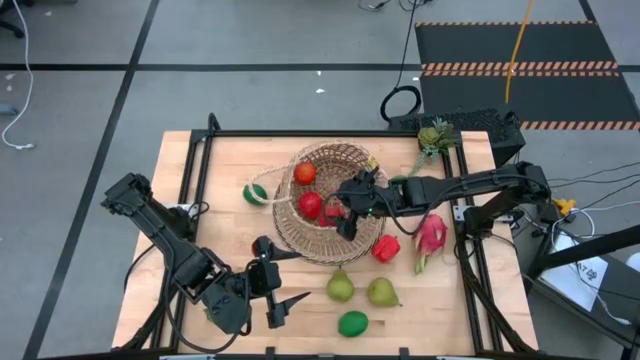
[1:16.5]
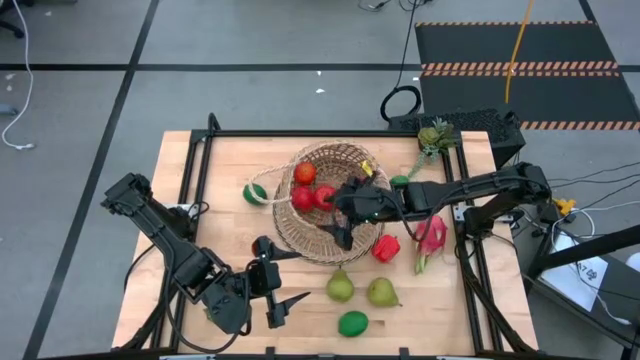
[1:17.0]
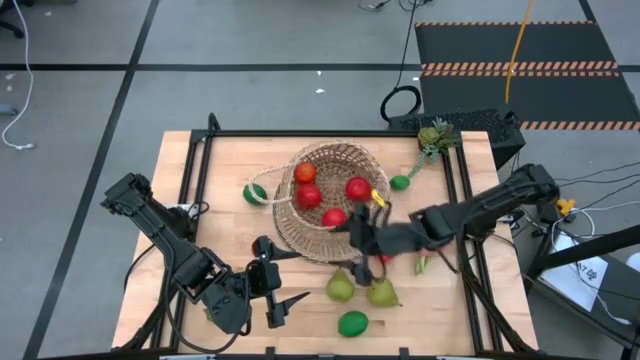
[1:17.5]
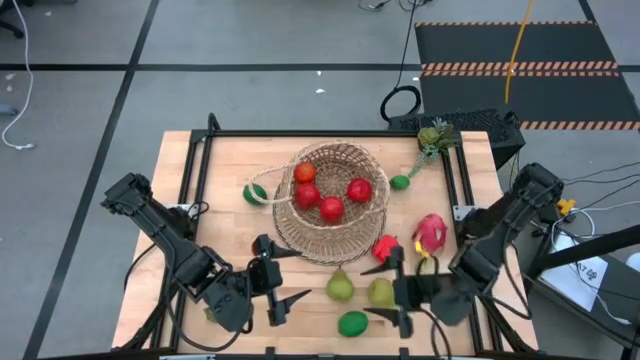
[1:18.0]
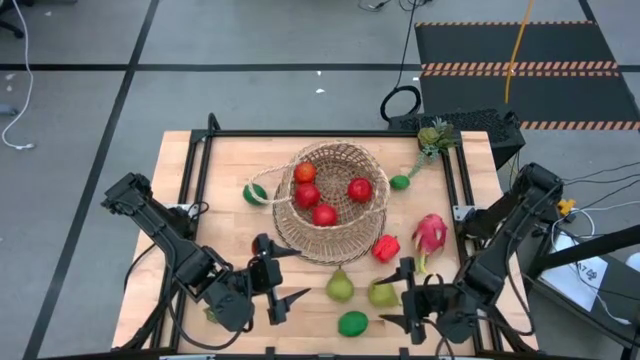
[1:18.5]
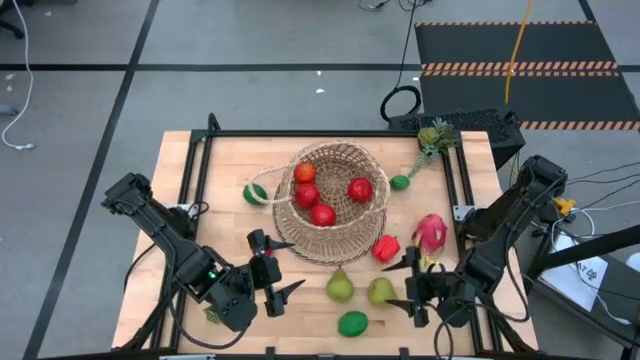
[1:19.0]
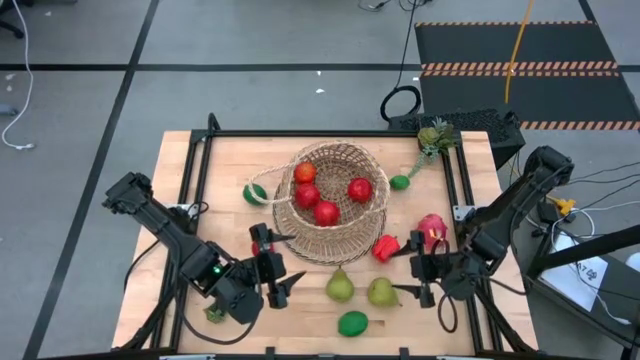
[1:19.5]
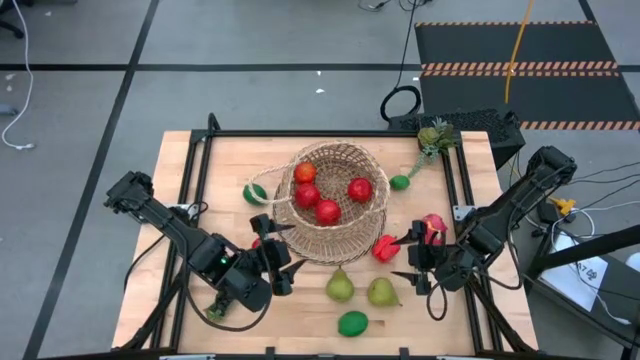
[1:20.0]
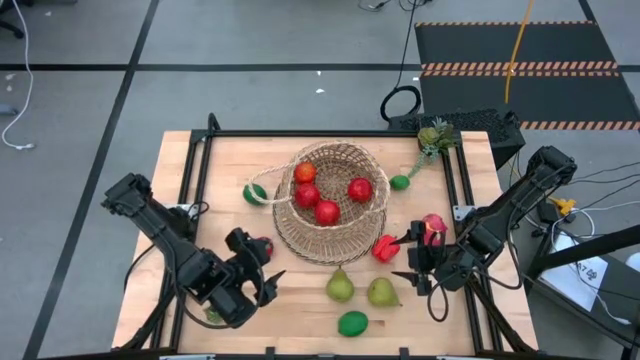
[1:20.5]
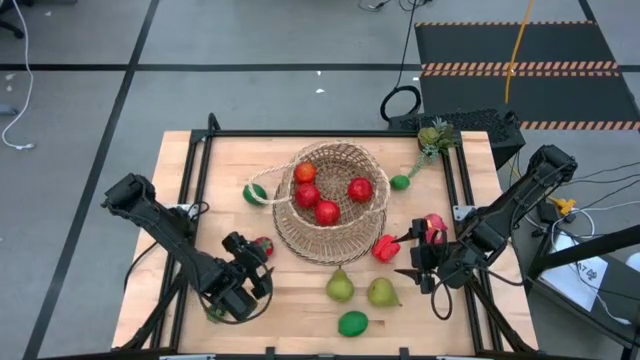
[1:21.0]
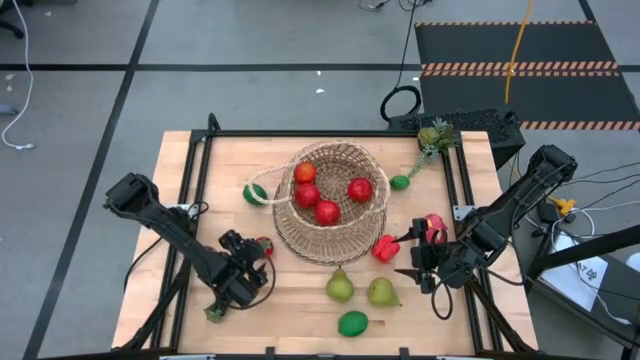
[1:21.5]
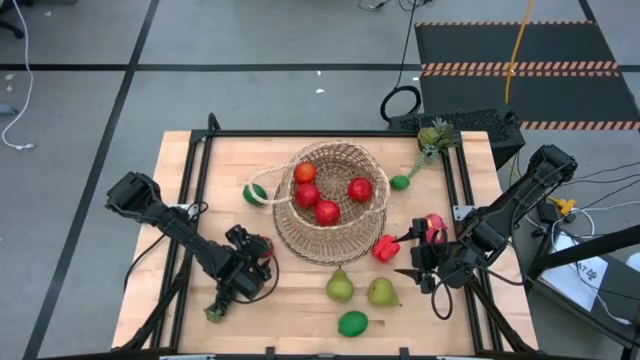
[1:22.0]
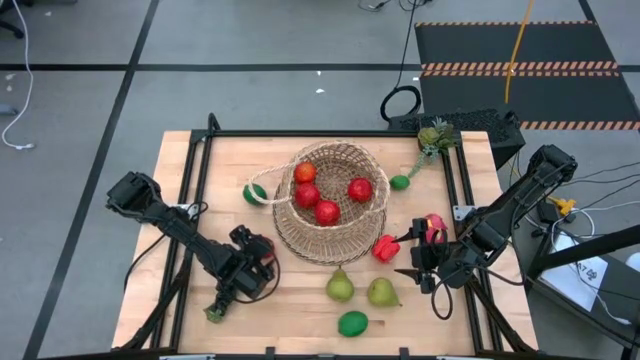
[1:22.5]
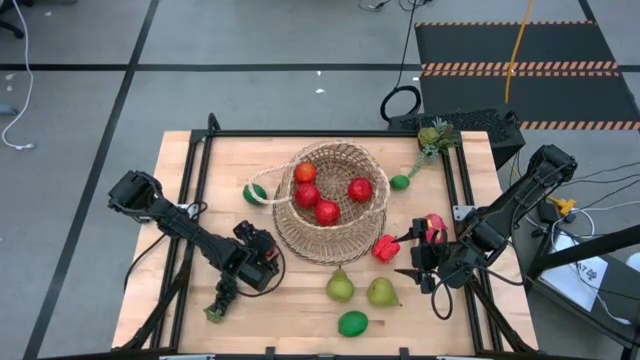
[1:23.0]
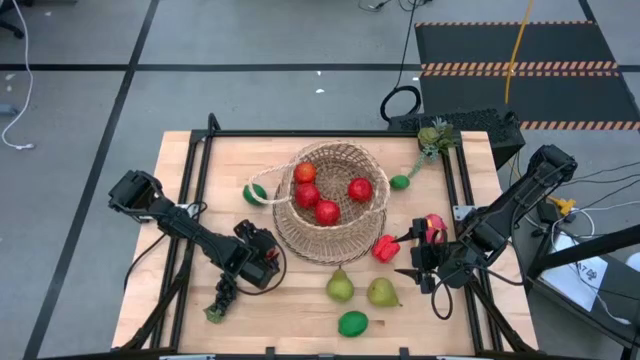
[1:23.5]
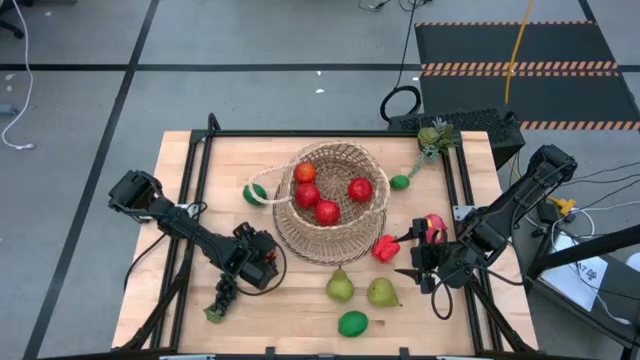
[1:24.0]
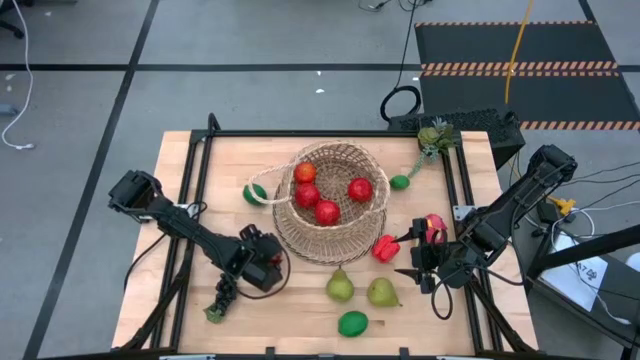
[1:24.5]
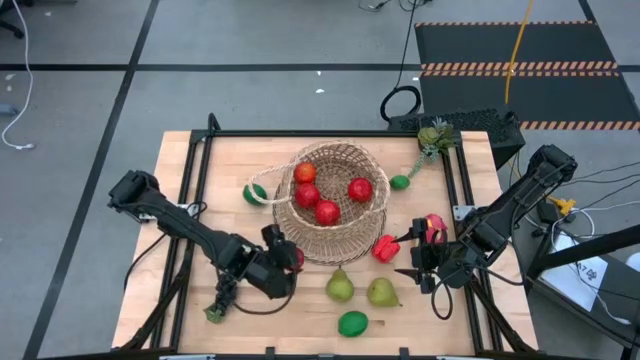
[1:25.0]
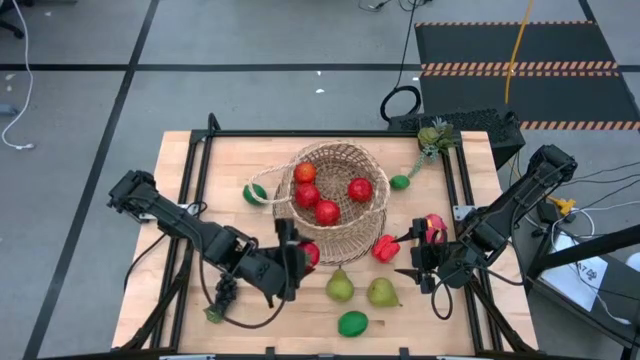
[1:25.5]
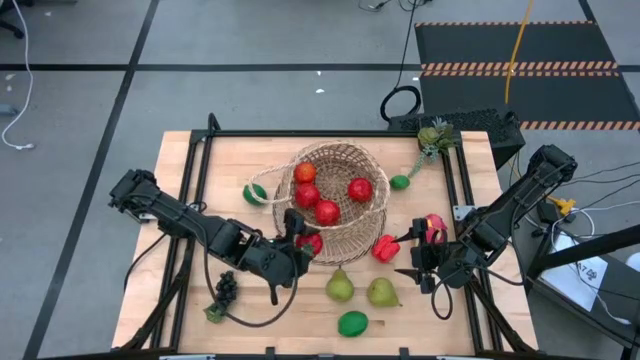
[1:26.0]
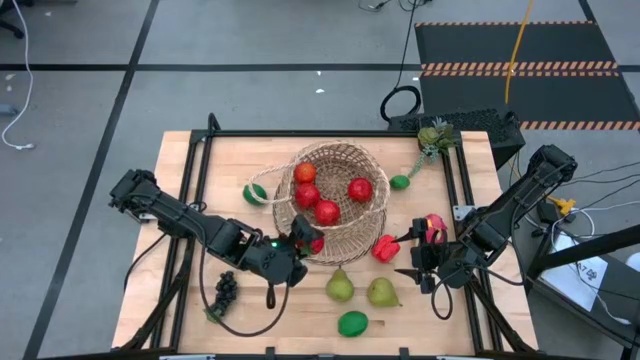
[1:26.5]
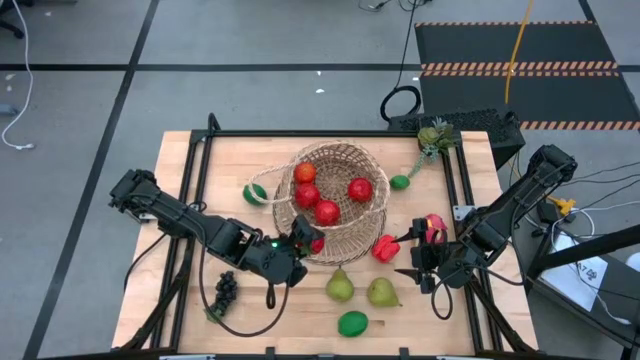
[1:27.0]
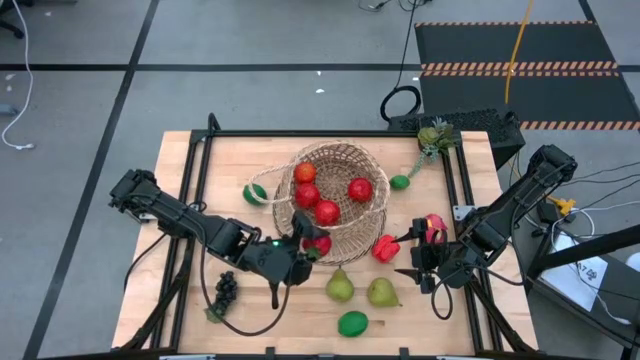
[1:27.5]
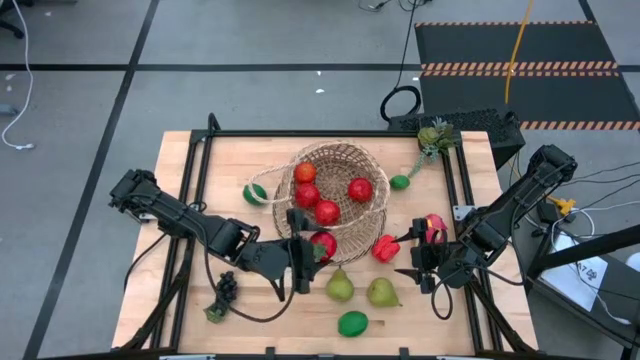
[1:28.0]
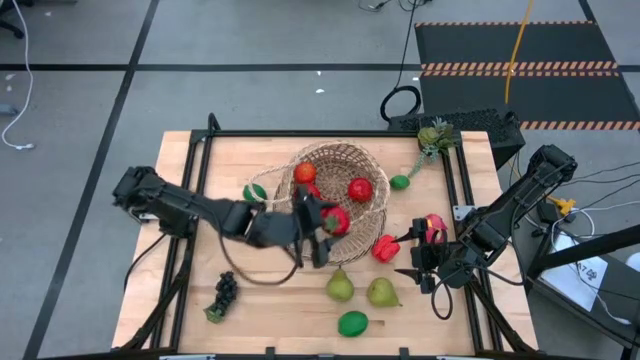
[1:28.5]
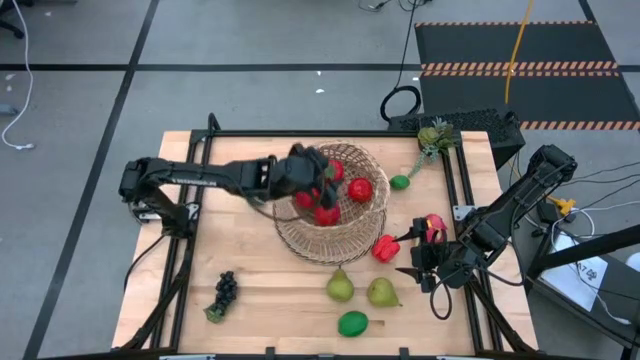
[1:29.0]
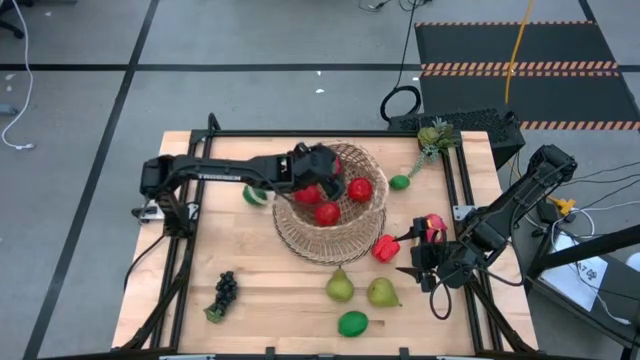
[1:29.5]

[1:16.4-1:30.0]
Task: Build produce basket
Put the red tomato into the basket

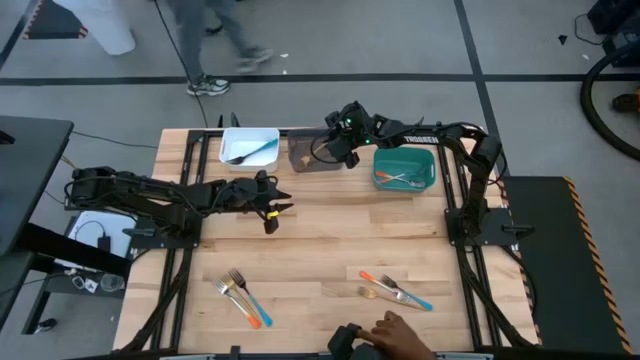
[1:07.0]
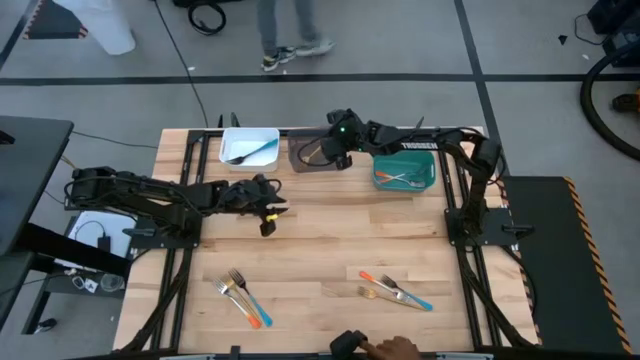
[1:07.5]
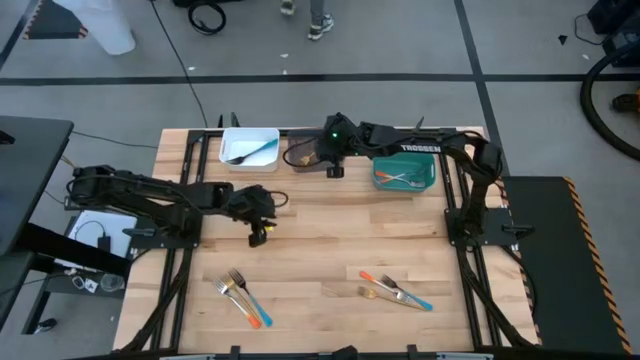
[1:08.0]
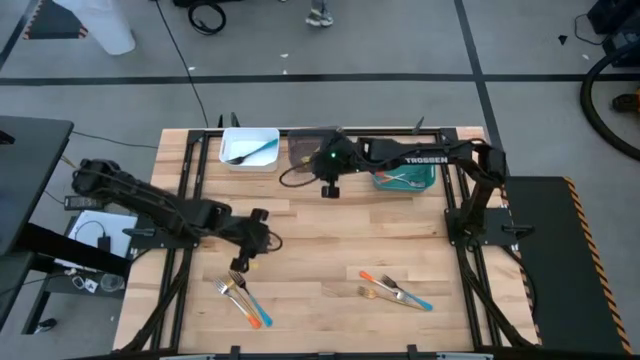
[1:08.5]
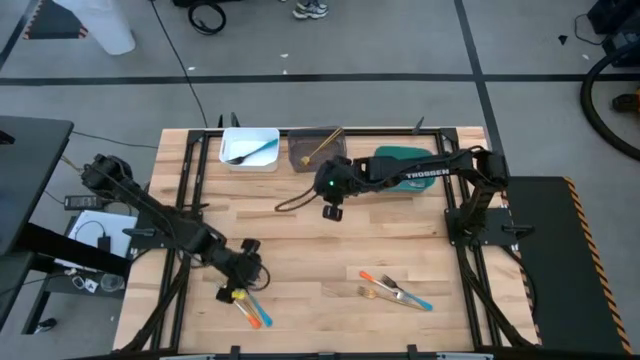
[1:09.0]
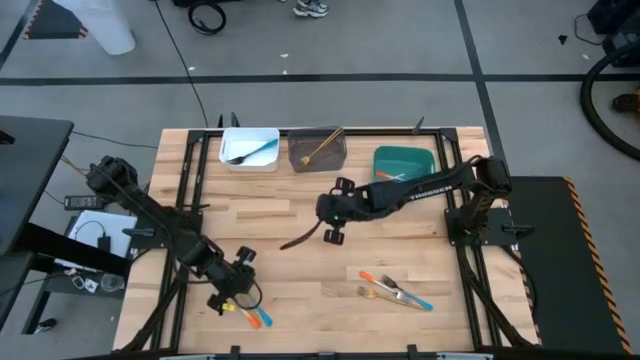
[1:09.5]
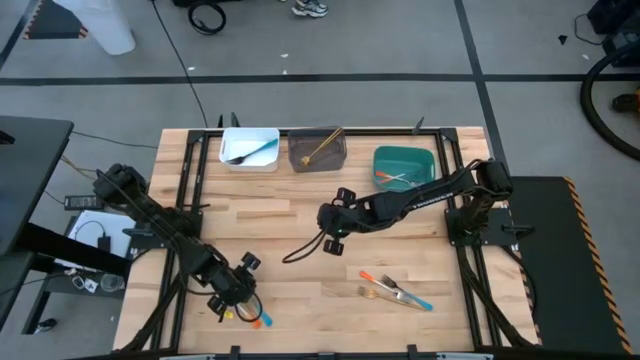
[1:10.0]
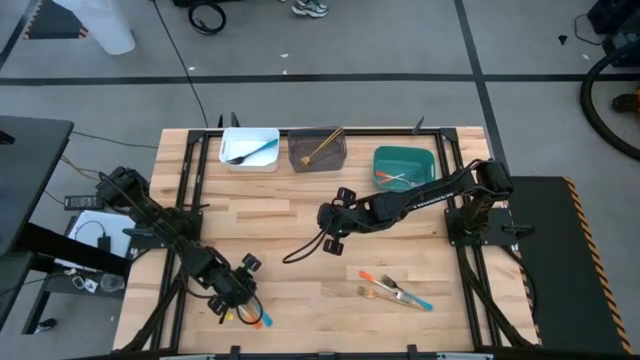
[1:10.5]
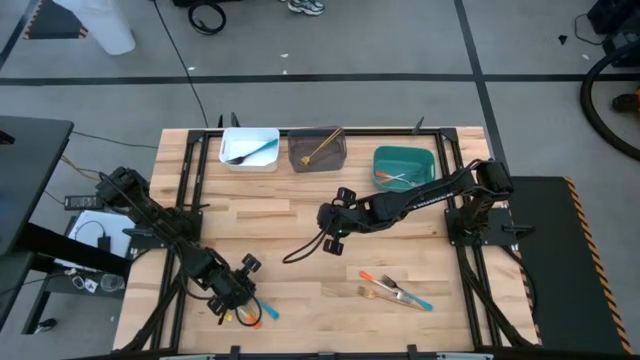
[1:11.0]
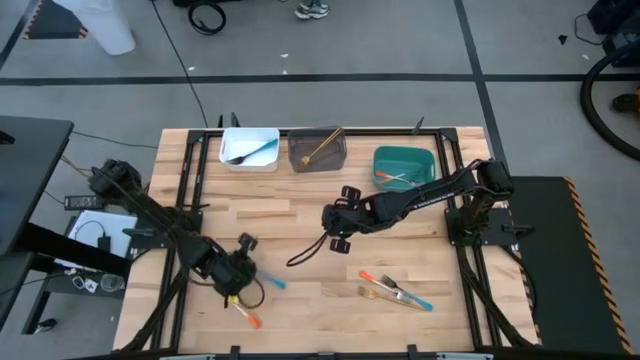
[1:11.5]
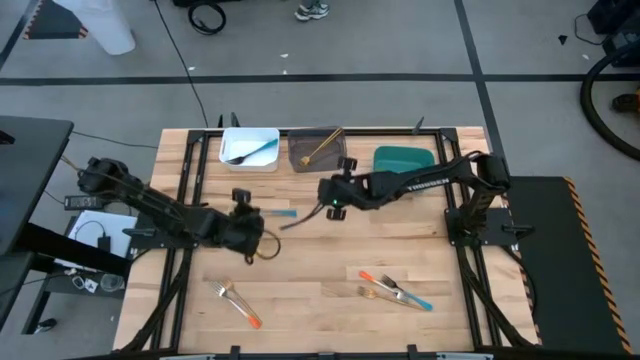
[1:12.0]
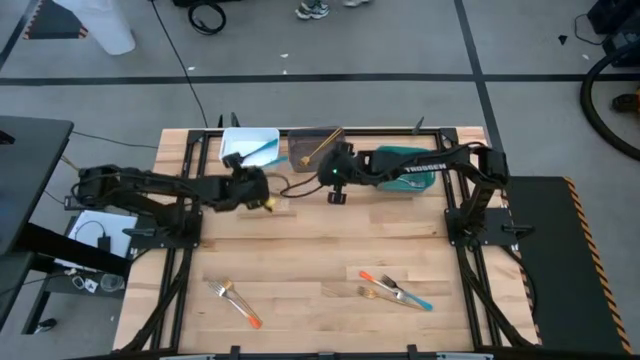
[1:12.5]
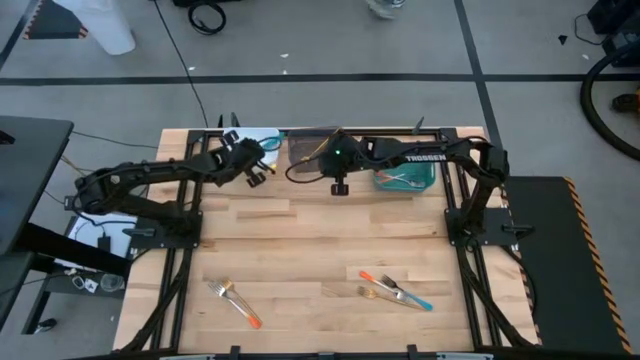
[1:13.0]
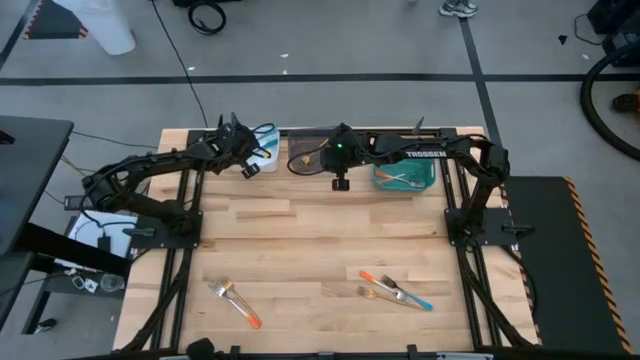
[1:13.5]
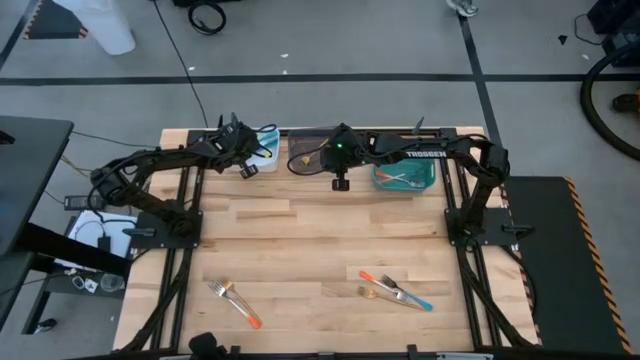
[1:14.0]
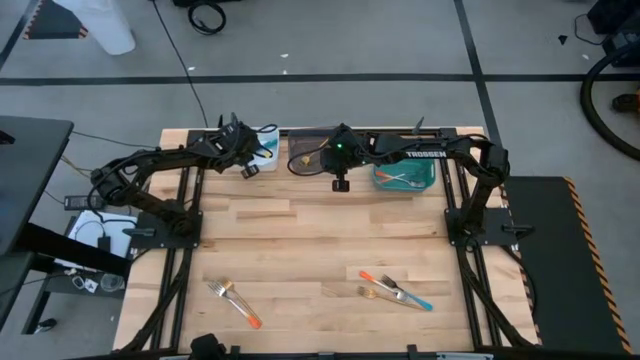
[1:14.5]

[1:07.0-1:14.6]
Task: Sort silverware by color (type)
Put the blue fork into the white bin
